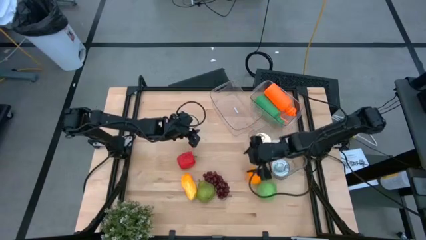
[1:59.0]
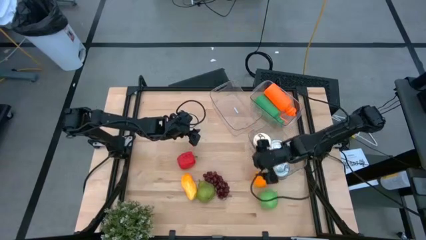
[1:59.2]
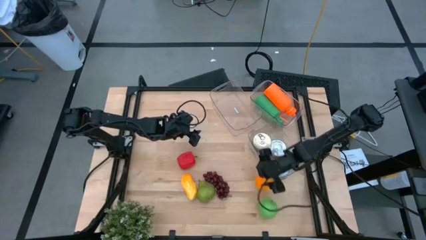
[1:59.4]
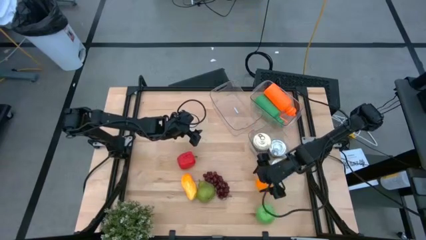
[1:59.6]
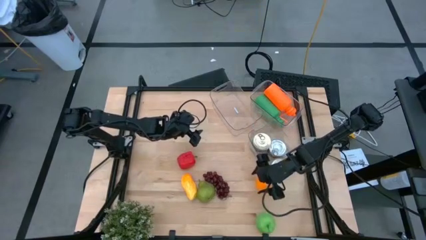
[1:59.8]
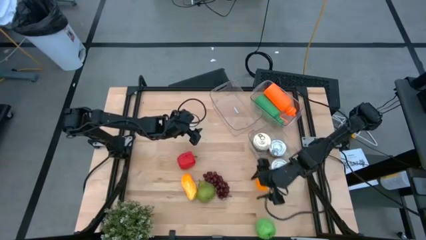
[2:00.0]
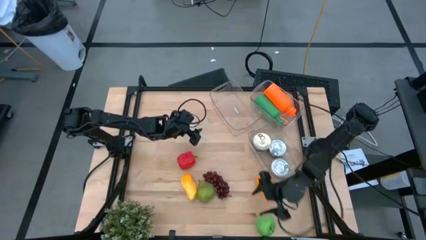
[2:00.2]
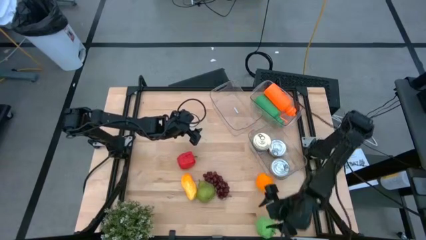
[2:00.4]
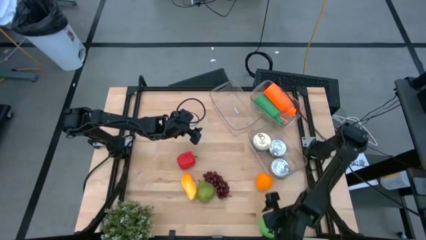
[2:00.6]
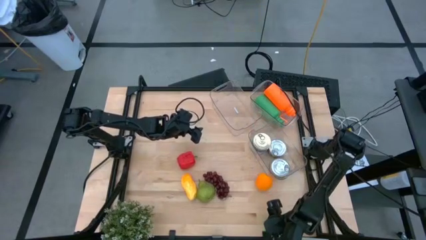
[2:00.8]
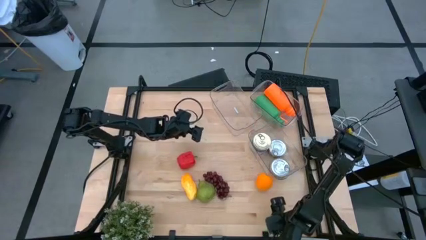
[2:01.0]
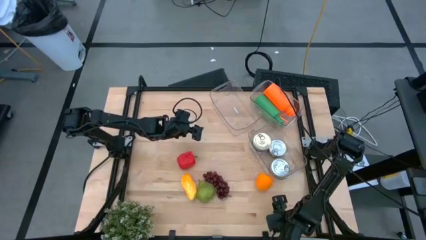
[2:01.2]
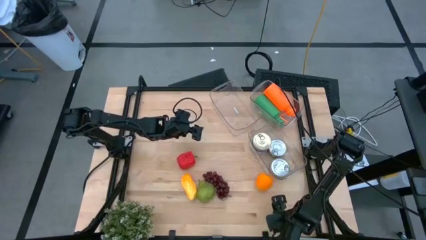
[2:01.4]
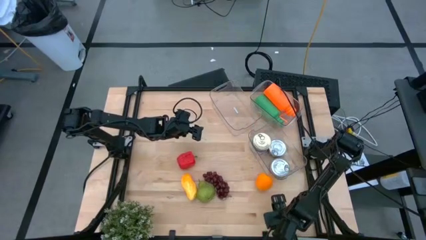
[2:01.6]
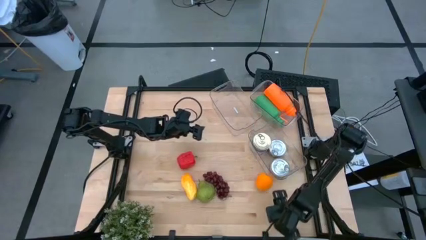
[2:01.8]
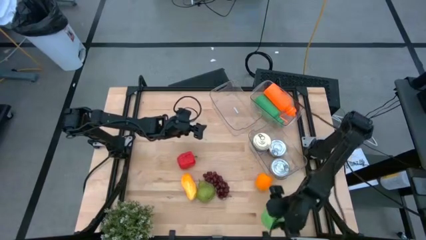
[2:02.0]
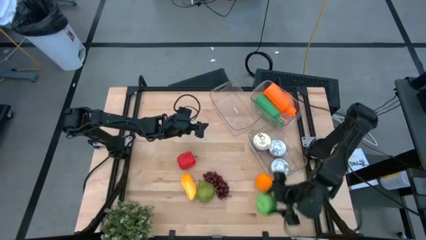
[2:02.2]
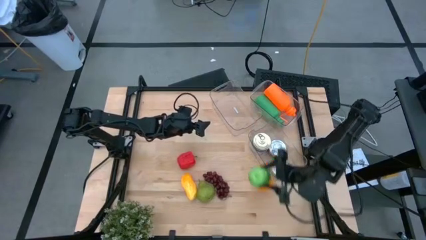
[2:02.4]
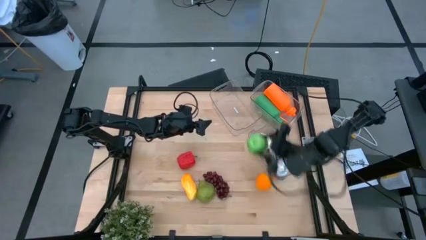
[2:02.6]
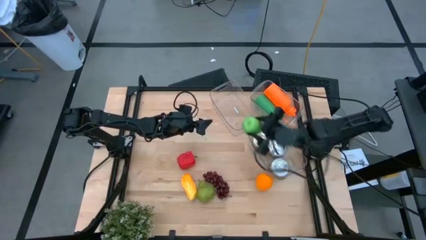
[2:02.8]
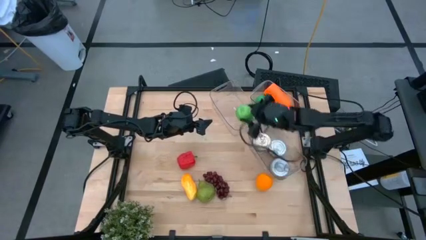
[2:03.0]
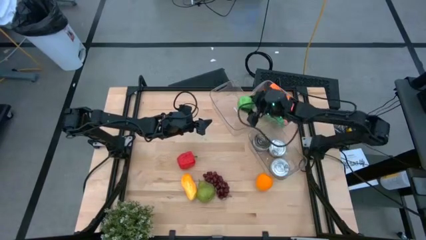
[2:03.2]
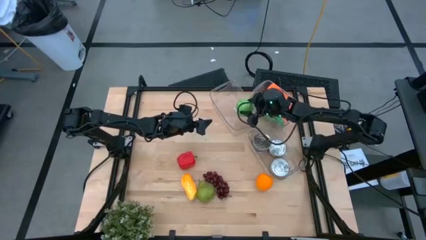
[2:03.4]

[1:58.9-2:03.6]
Task: Pick & Place Food Item
Put the green apple into the top left transparent bin

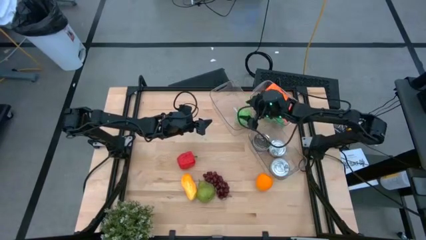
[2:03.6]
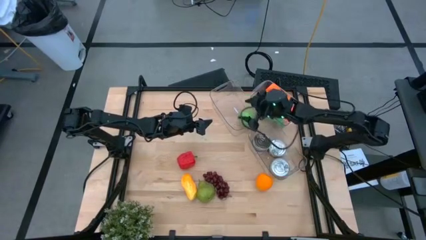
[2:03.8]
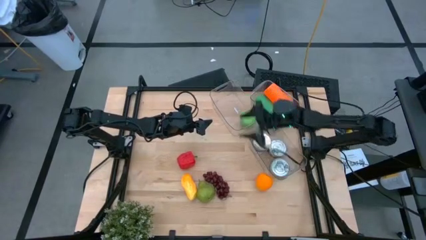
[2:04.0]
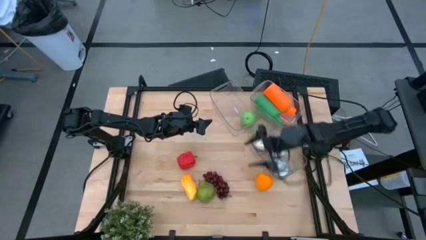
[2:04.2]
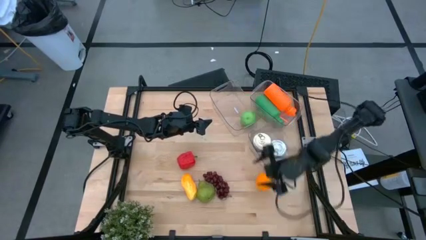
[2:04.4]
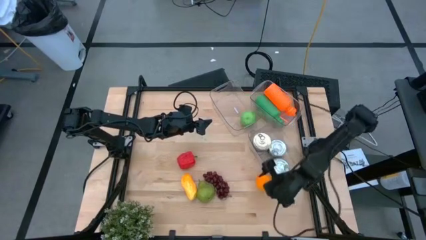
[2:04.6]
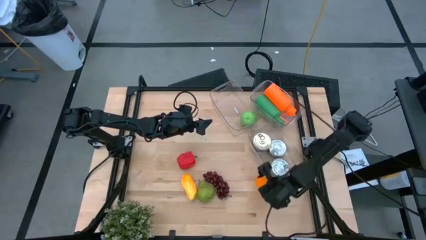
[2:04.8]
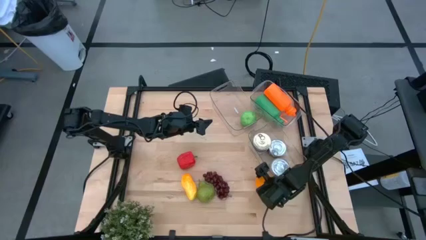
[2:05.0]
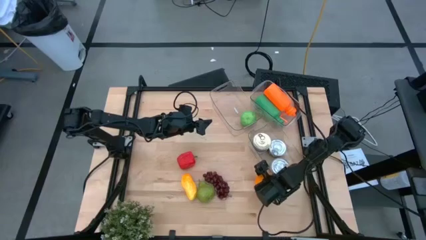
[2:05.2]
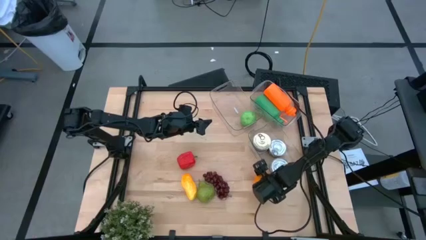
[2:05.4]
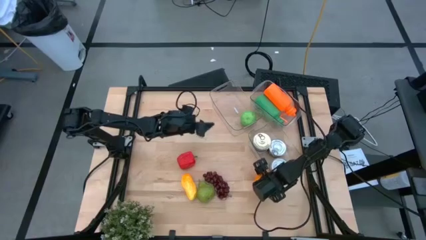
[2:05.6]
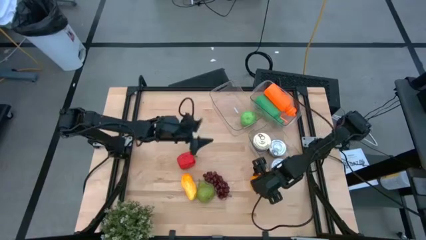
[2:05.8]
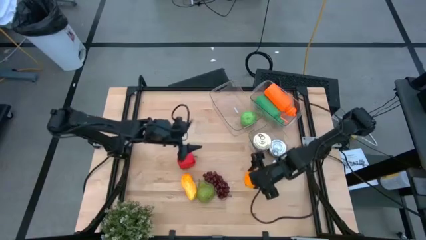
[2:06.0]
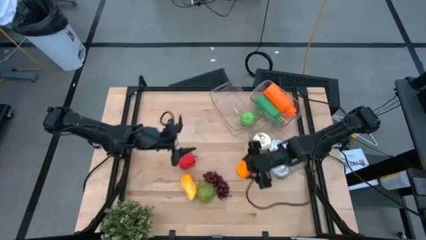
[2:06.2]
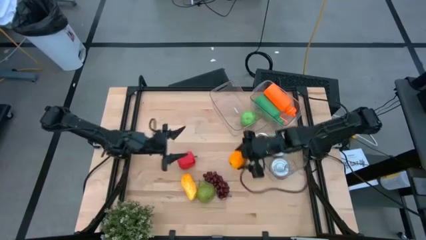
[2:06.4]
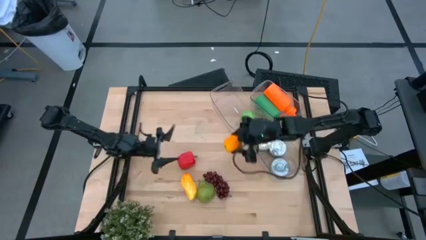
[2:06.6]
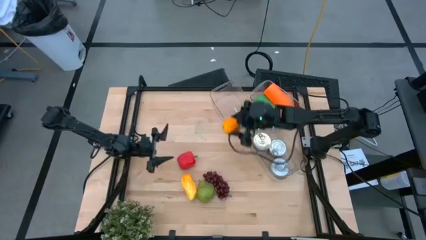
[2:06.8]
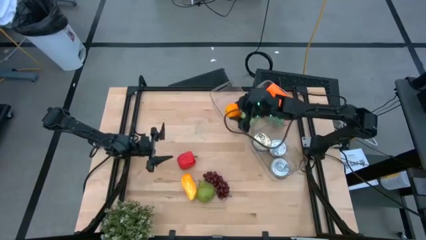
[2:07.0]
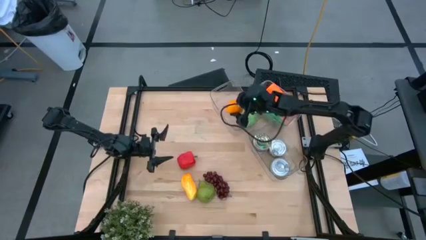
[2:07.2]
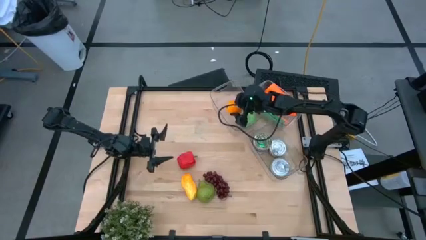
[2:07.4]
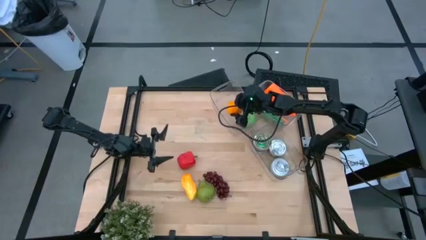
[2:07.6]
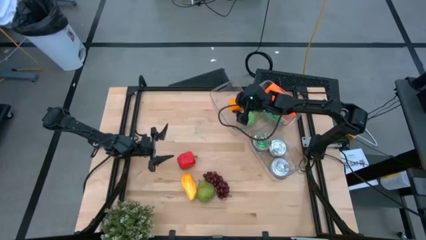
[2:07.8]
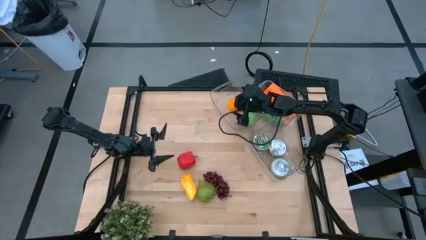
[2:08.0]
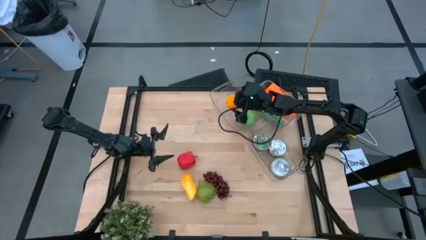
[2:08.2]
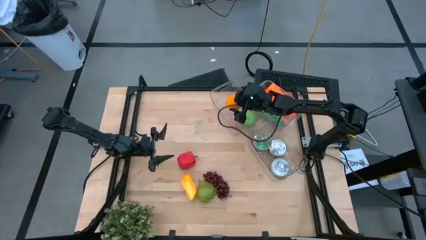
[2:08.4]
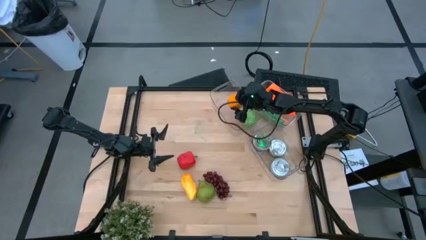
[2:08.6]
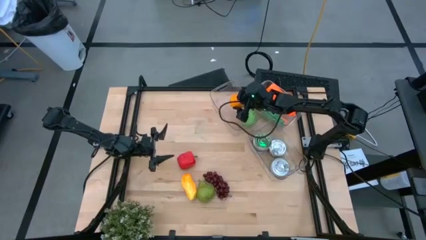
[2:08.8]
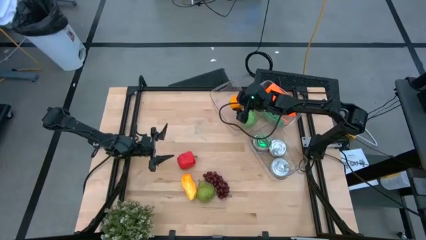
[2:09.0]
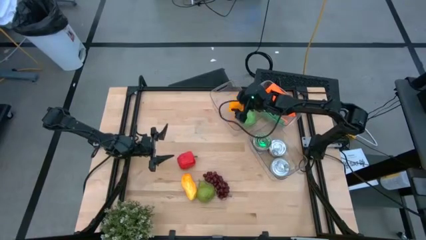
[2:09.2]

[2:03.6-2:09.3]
Put the orange into the top left transparent bin

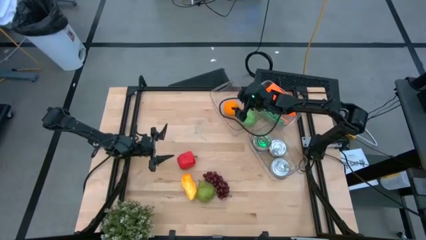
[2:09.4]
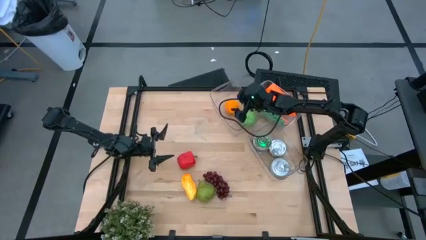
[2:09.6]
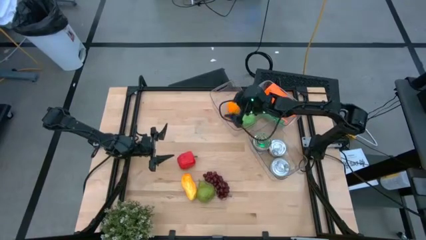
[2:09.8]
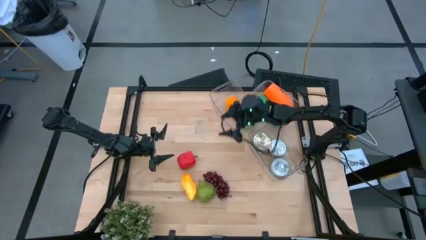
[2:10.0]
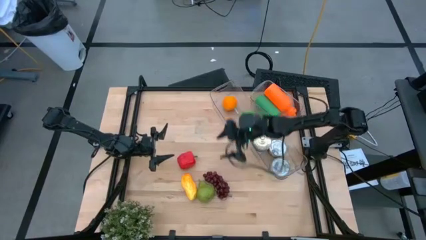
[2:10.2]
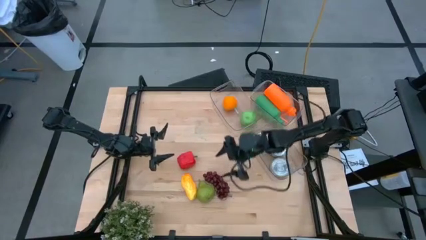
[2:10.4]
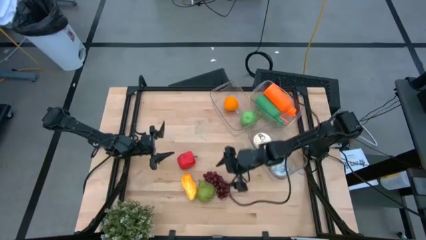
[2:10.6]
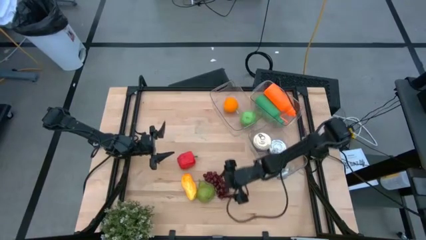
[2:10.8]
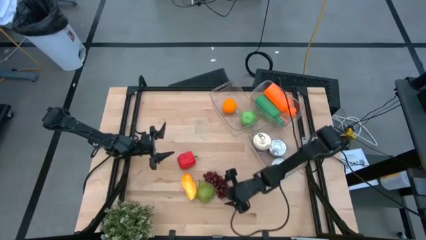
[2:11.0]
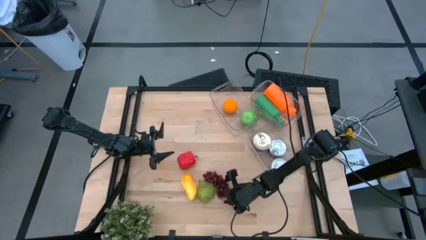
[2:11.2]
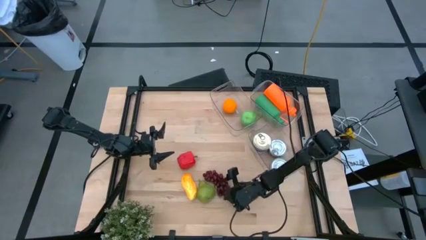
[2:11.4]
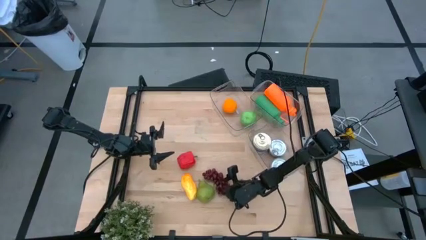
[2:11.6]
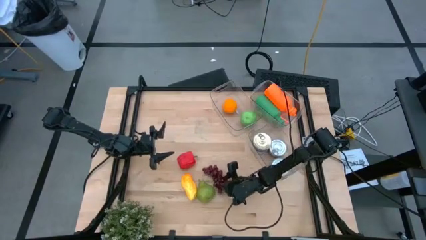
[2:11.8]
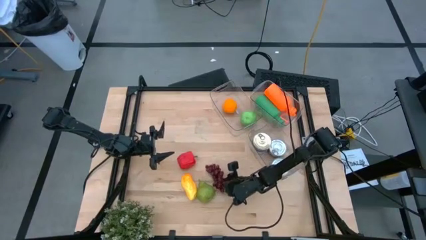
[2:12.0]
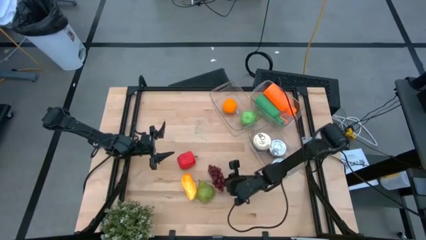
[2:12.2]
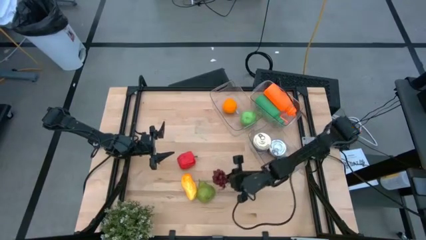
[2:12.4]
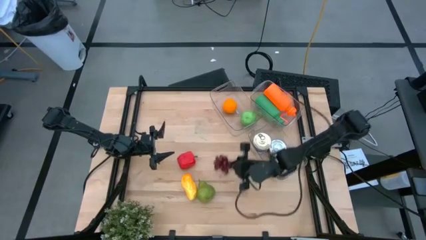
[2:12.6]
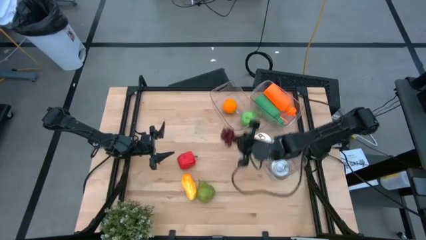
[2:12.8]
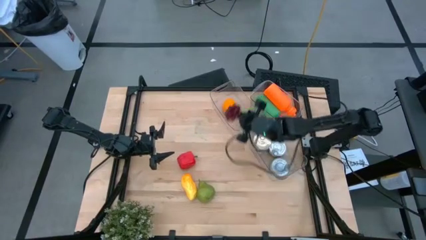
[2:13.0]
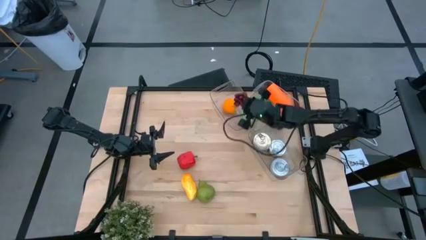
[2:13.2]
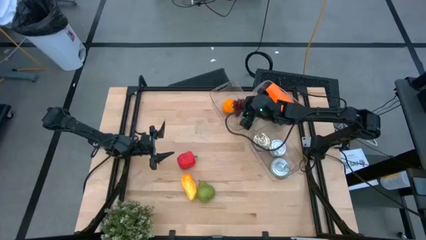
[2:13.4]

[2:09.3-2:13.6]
Put the purple grapes into the top left transparent bin

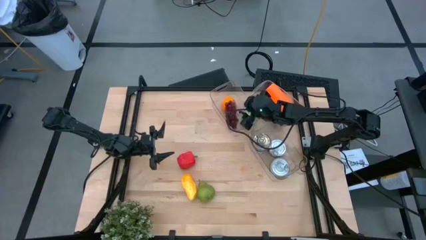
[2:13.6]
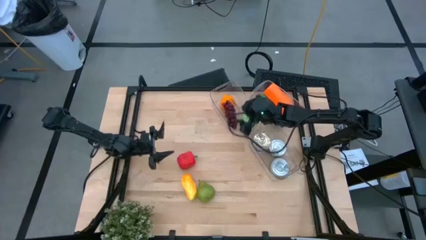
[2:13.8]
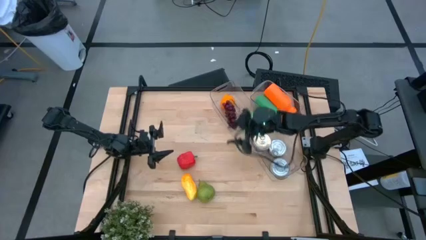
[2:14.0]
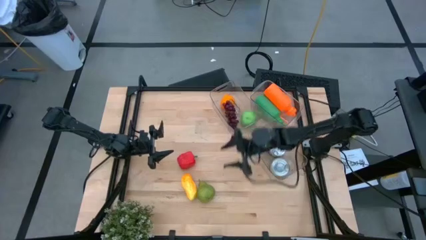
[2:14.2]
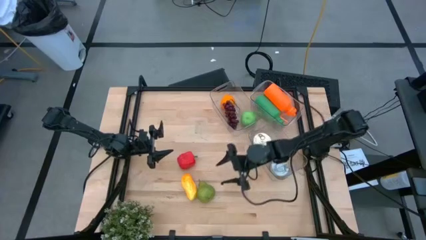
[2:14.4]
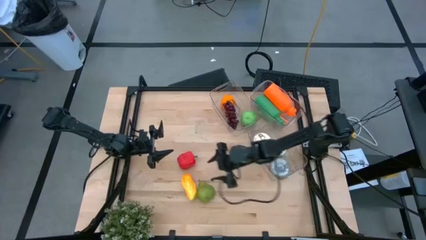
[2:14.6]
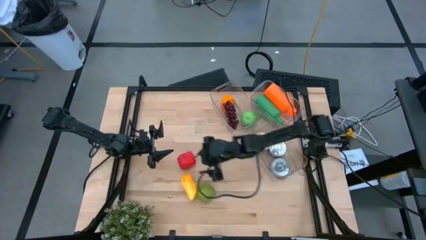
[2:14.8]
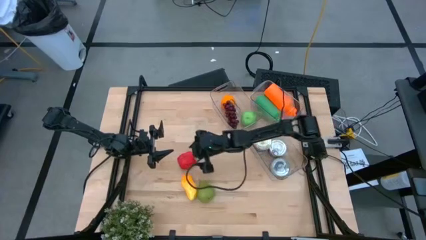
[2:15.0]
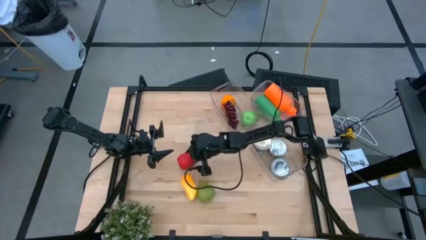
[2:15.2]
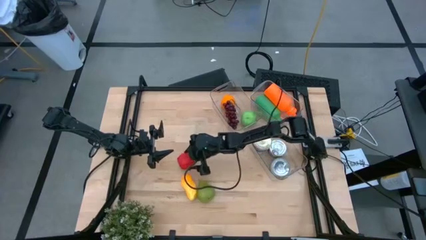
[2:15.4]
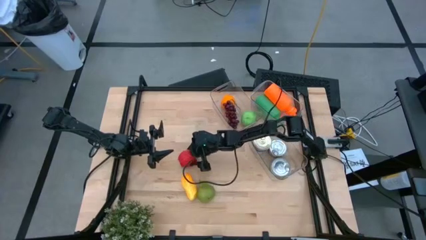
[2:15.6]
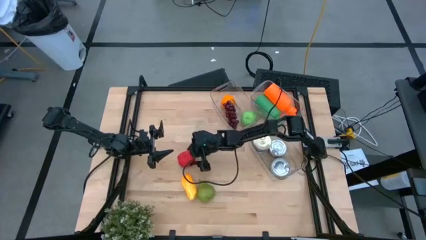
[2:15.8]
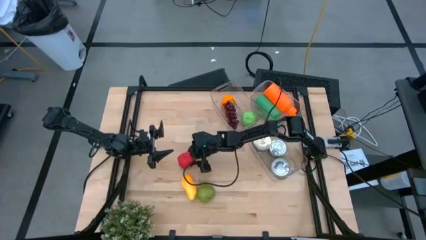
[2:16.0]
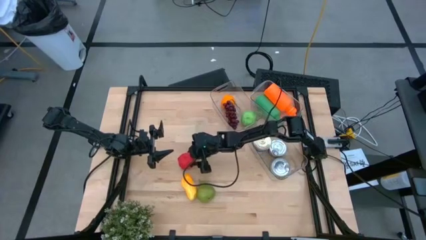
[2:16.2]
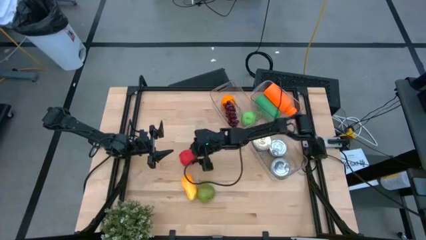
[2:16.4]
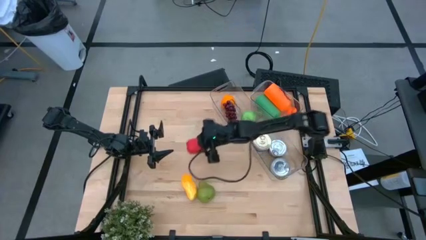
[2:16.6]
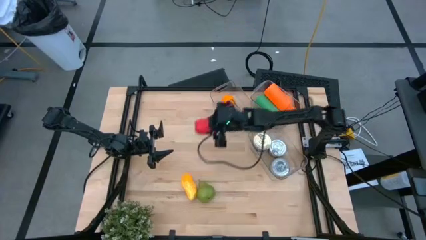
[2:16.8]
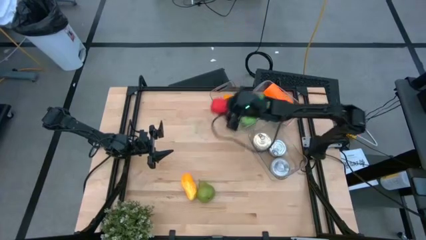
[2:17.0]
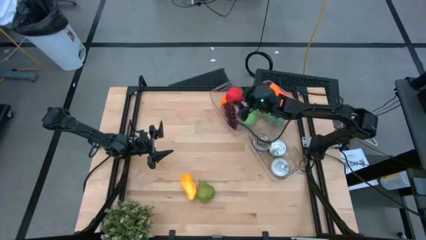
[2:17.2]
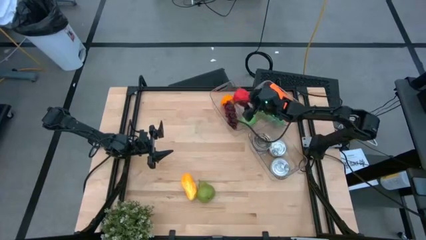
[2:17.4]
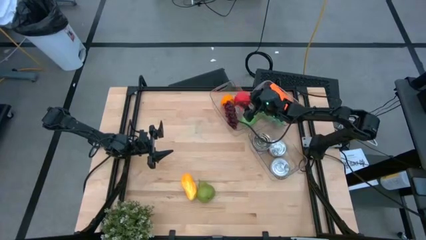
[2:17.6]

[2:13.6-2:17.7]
Put the red bell pepper into the top left transparent bin
